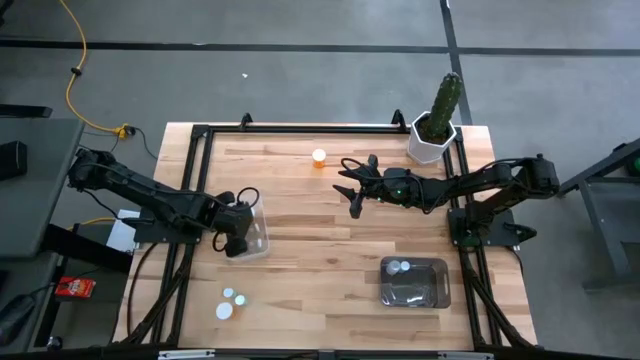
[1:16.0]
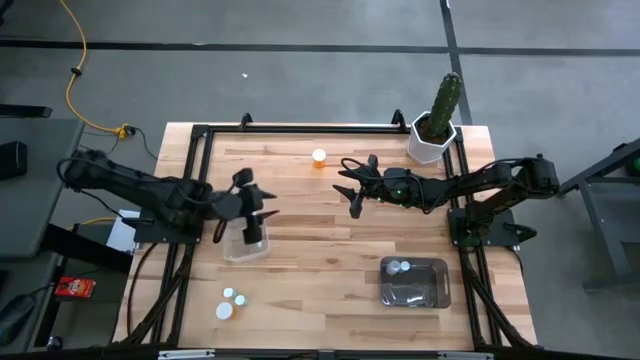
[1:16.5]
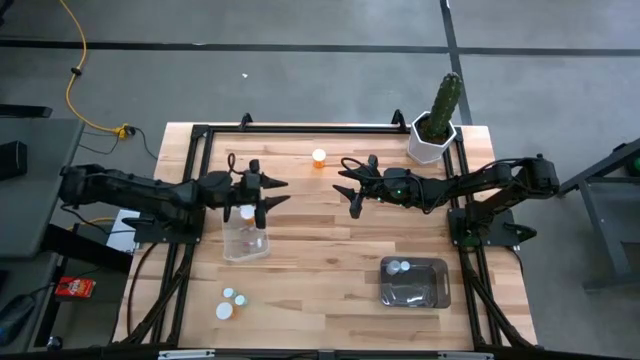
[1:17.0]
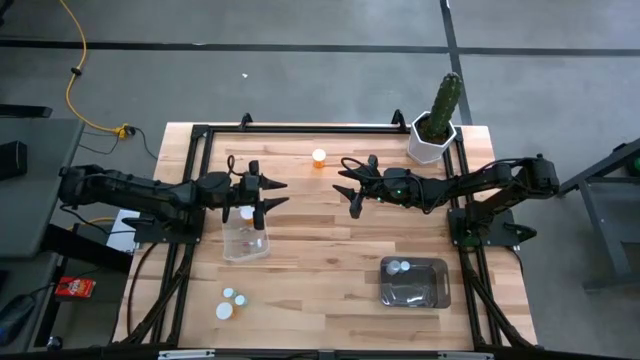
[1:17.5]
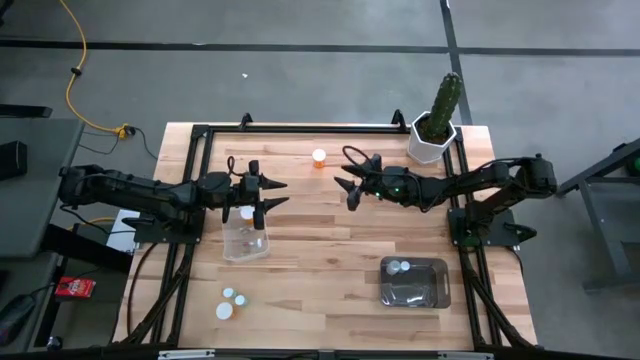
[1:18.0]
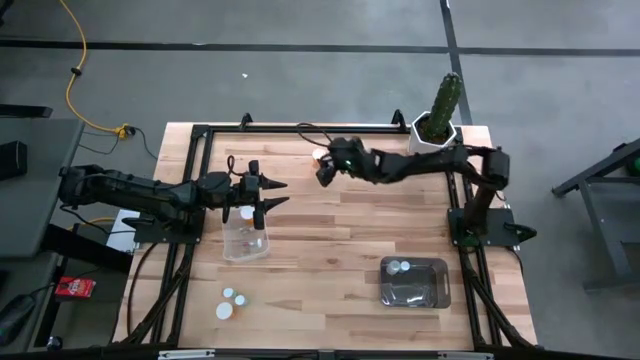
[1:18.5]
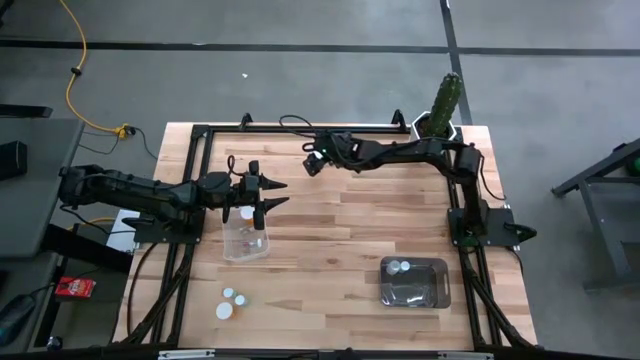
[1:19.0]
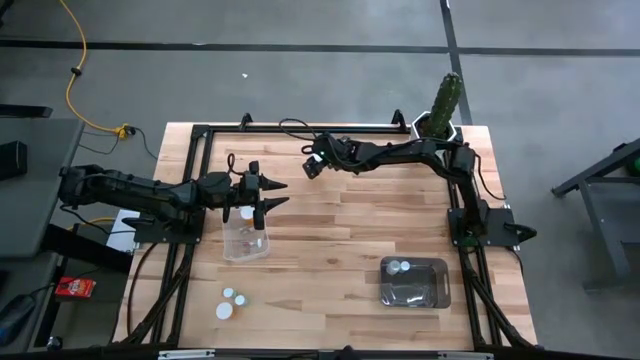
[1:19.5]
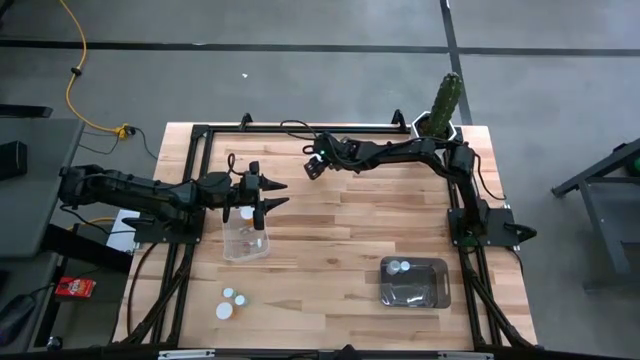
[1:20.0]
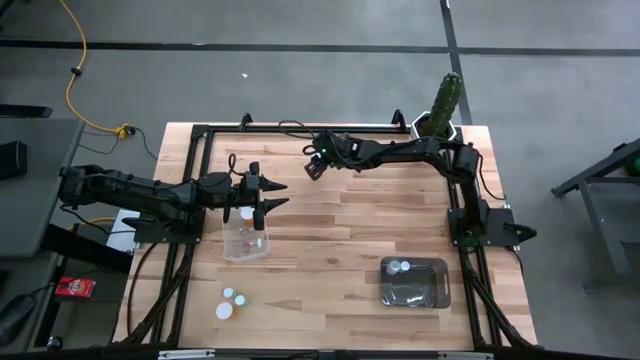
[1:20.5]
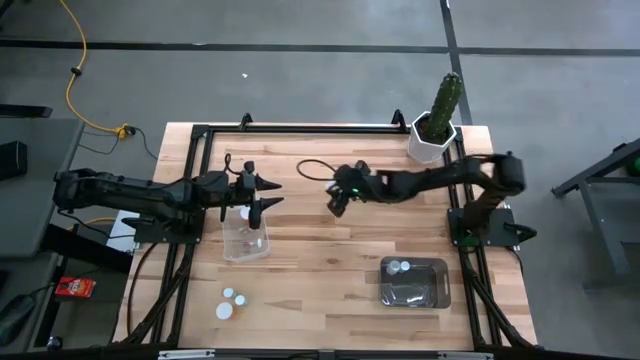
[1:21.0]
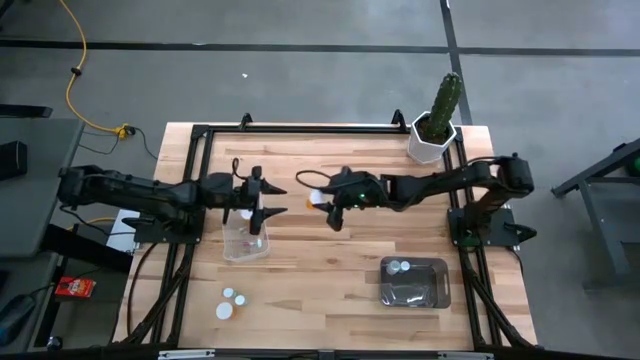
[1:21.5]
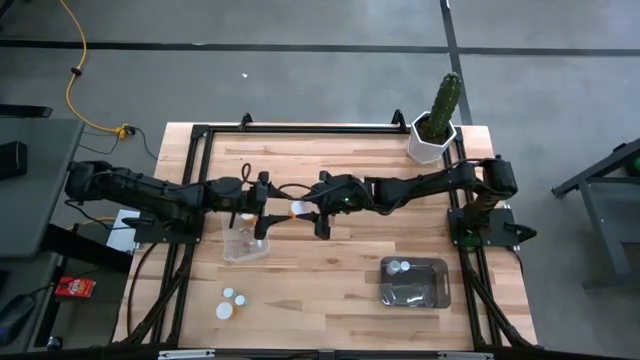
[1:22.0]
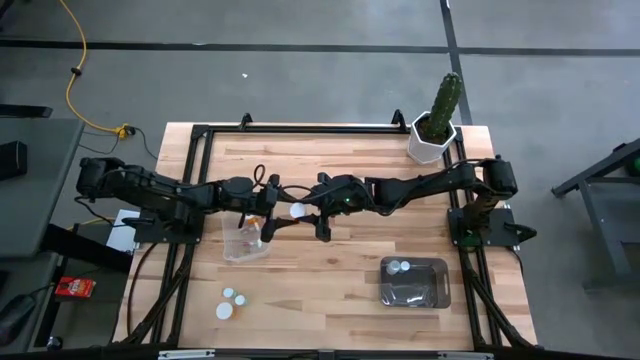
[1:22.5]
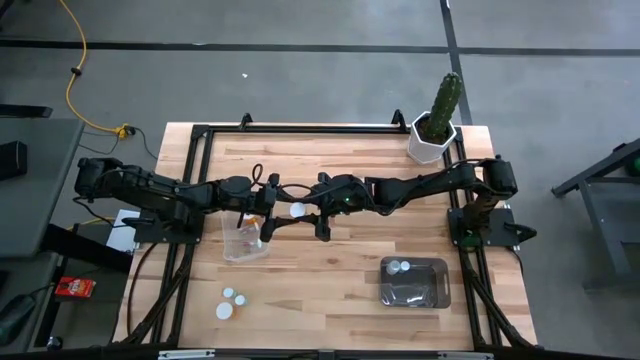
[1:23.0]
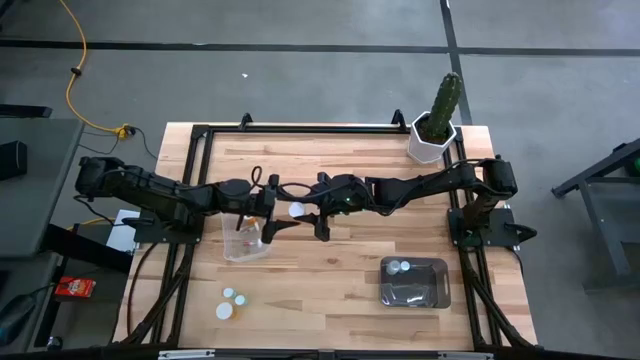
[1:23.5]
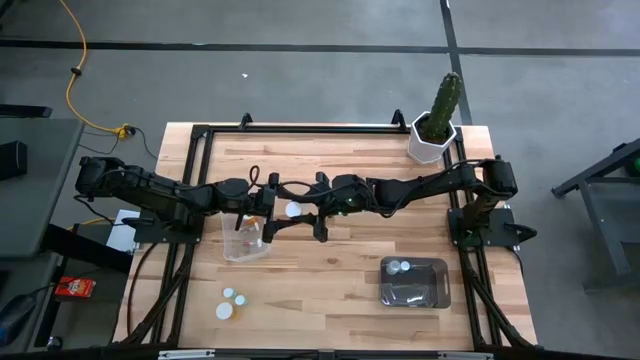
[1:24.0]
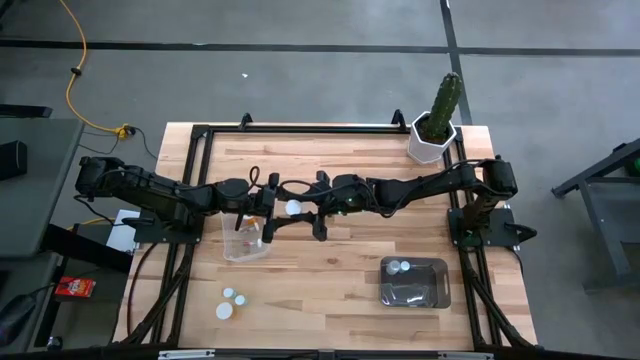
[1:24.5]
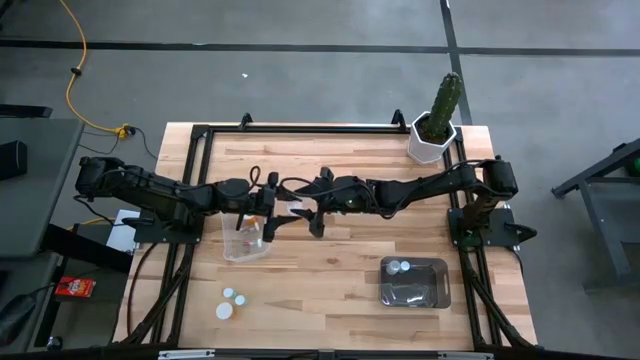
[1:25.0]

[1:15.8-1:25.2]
Task: Pick and place medicine bottles into bin by pill shape (circle, oval)
Put the top right orange capsule bottle into the transparent bin

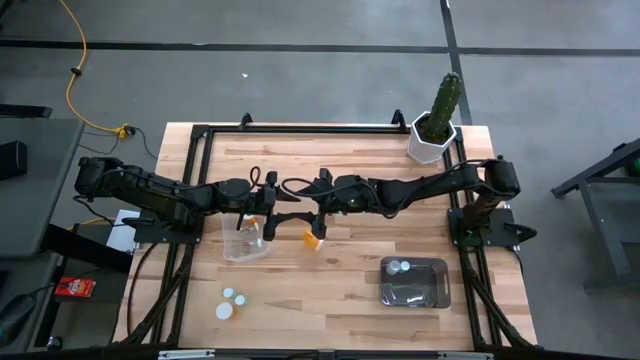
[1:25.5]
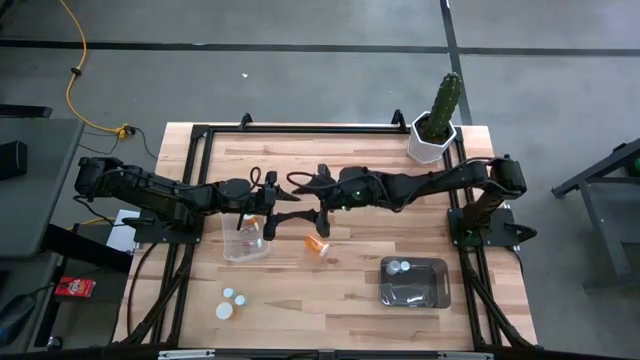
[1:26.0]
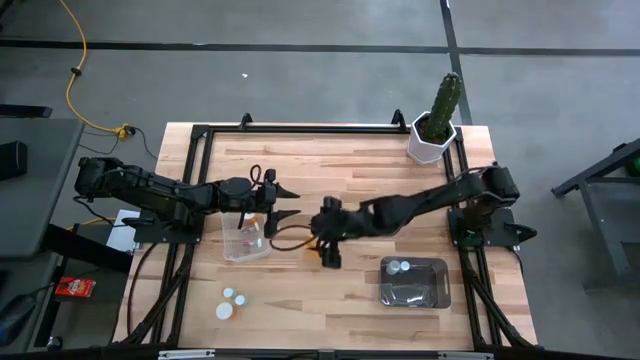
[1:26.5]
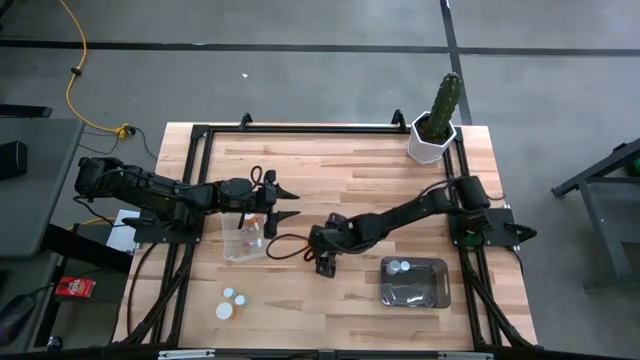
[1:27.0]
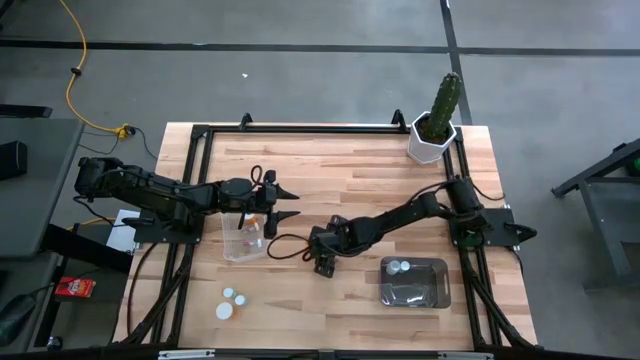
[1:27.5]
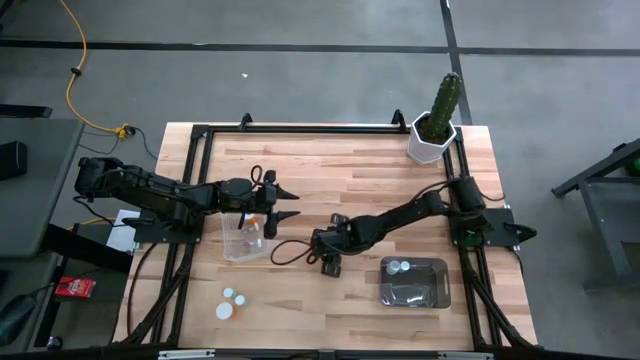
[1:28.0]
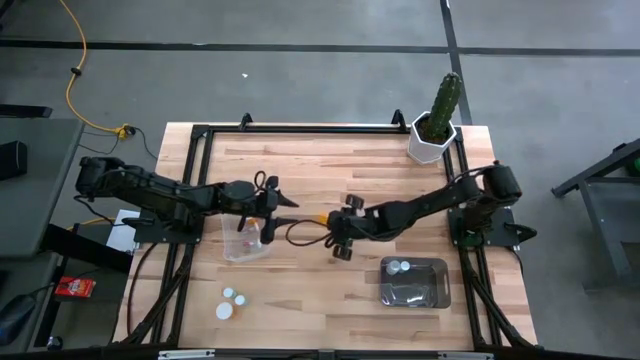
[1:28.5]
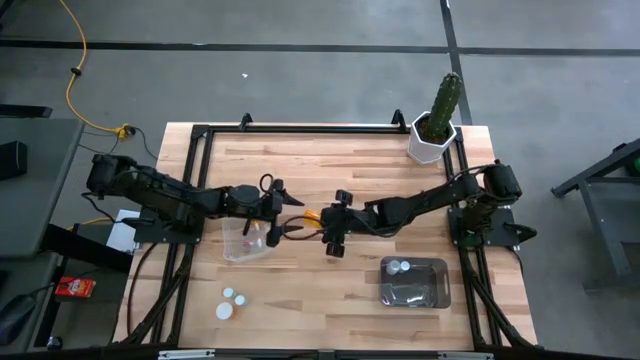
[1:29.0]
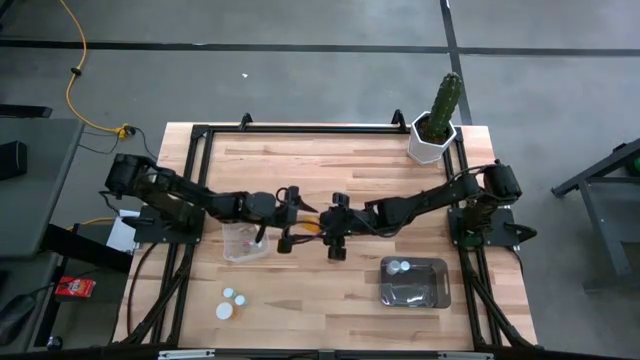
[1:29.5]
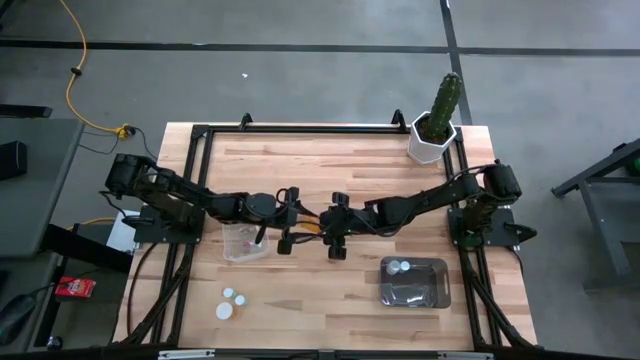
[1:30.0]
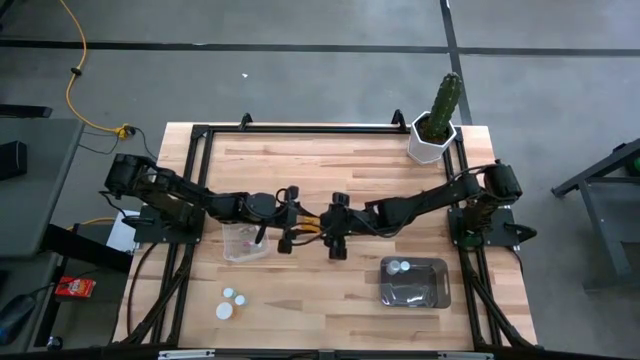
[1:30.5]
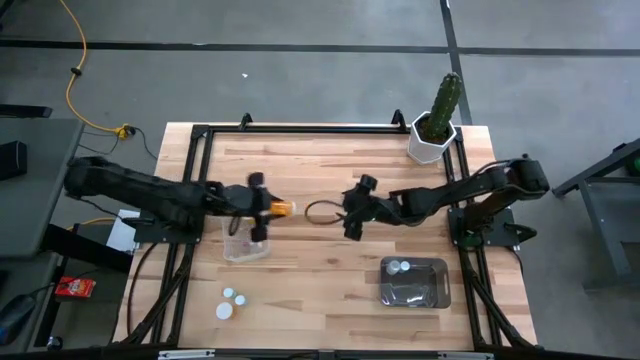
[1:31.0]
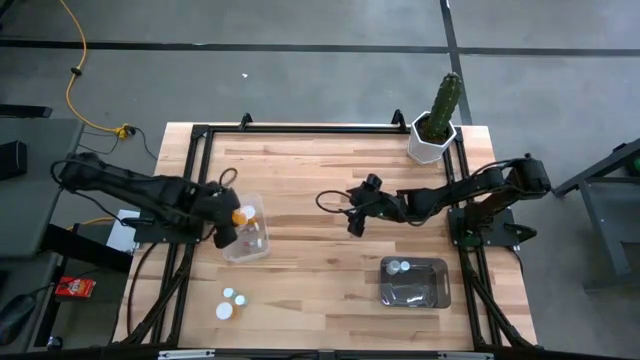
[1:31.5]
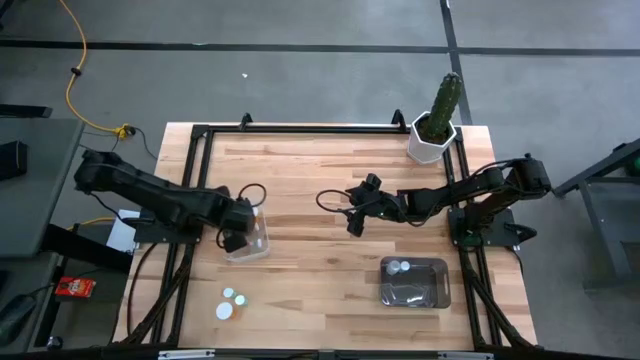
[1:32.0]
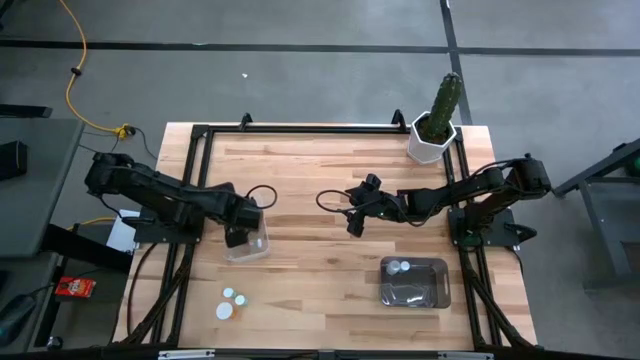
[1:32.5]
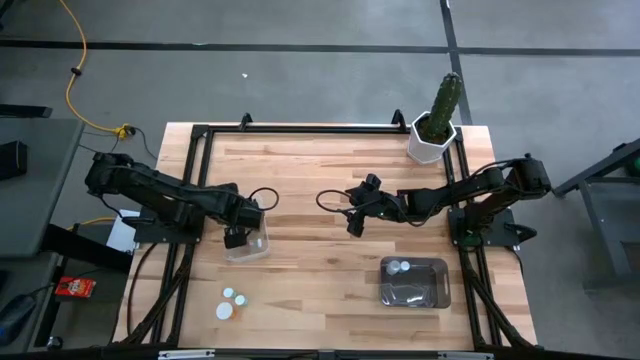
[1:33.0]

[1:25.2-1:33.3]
Put the top orange capsule bottle into the transparent bin
